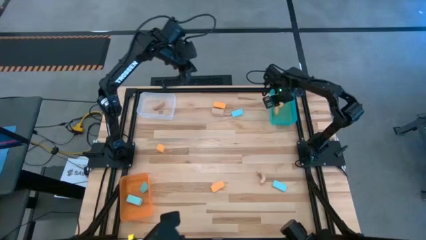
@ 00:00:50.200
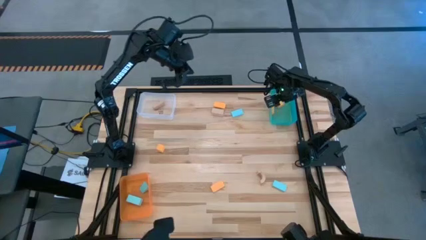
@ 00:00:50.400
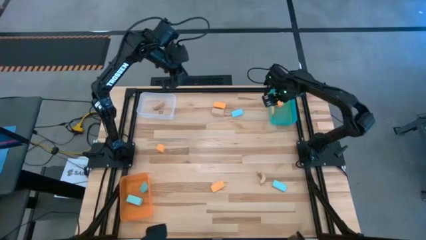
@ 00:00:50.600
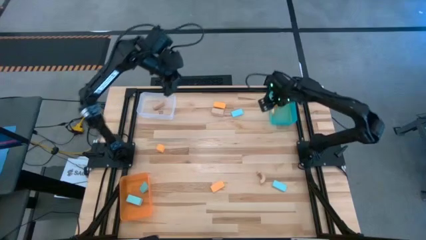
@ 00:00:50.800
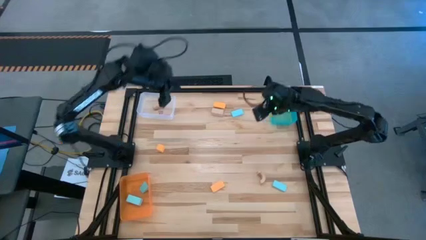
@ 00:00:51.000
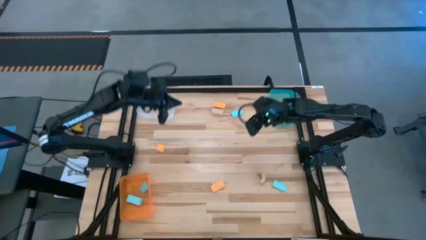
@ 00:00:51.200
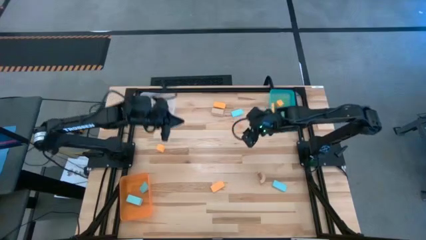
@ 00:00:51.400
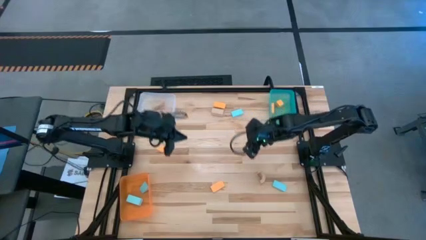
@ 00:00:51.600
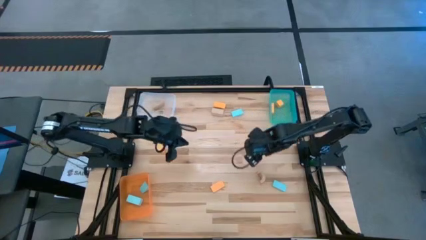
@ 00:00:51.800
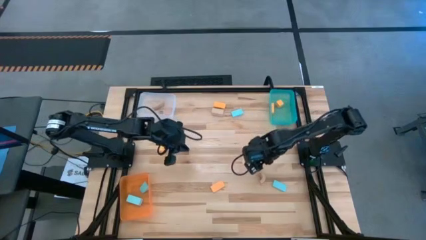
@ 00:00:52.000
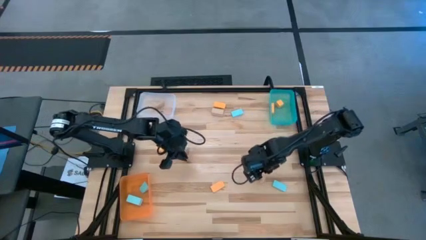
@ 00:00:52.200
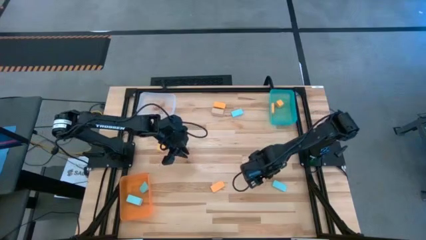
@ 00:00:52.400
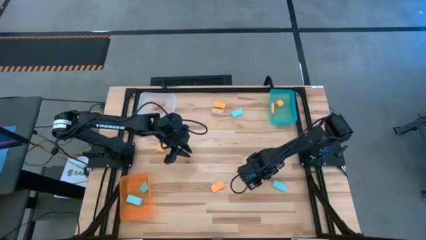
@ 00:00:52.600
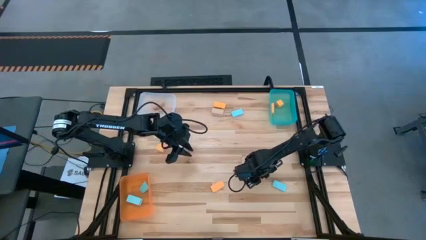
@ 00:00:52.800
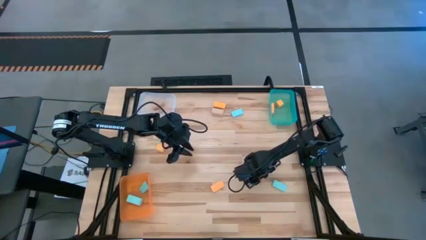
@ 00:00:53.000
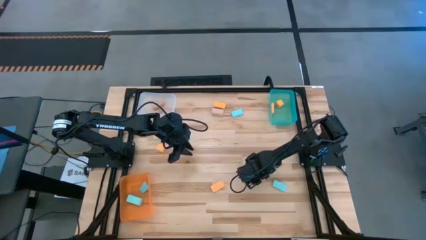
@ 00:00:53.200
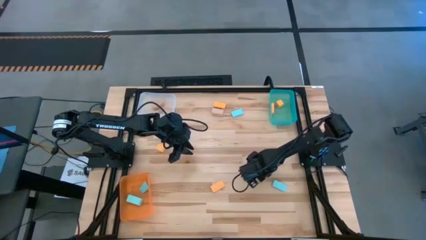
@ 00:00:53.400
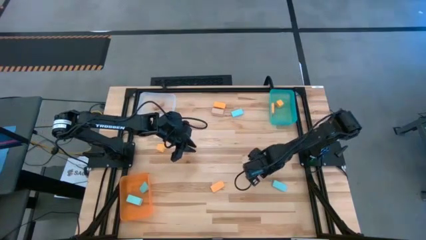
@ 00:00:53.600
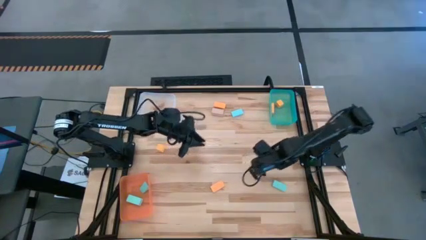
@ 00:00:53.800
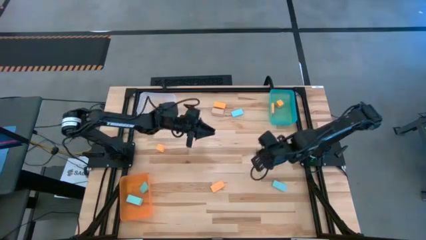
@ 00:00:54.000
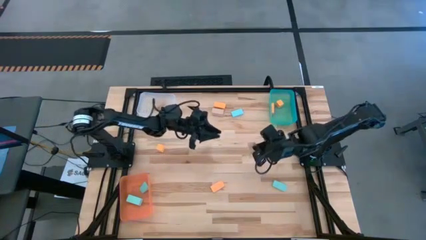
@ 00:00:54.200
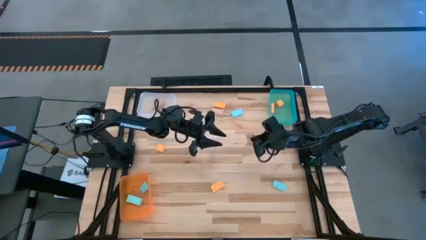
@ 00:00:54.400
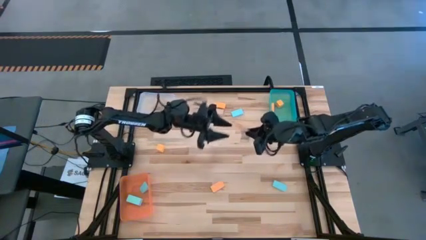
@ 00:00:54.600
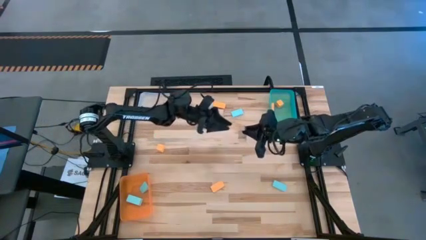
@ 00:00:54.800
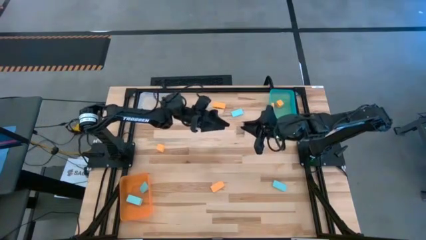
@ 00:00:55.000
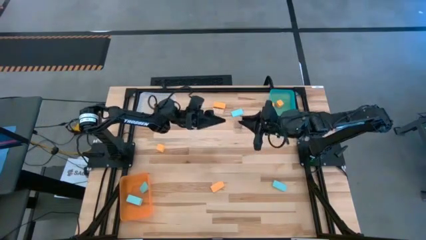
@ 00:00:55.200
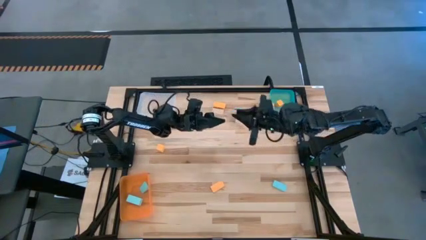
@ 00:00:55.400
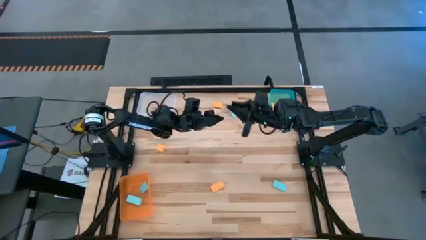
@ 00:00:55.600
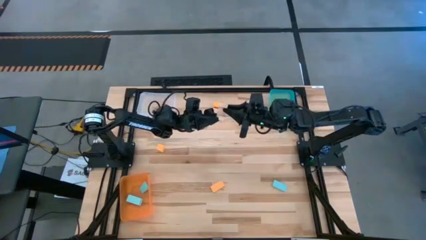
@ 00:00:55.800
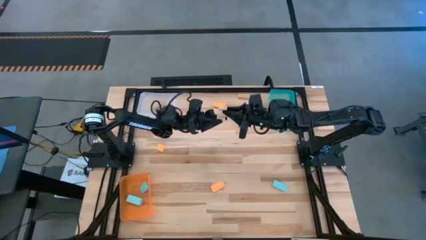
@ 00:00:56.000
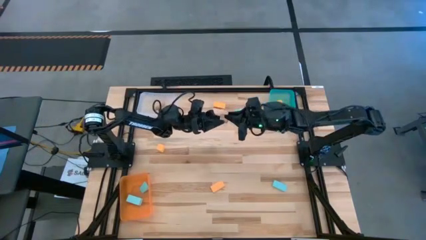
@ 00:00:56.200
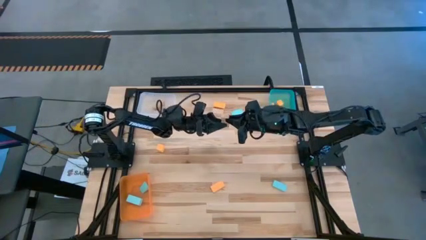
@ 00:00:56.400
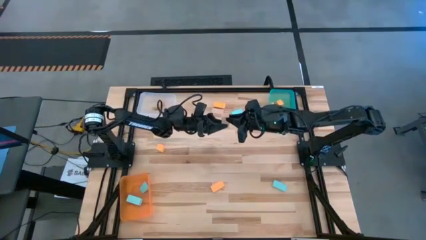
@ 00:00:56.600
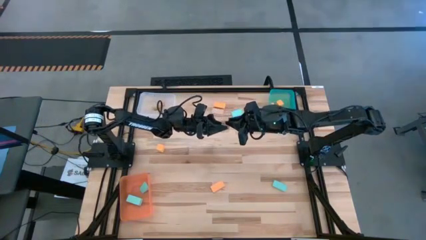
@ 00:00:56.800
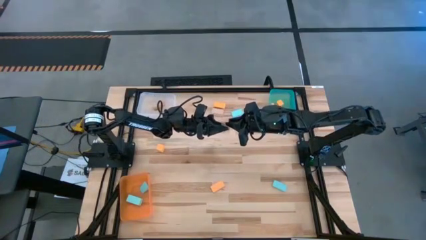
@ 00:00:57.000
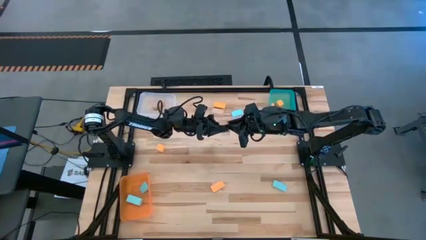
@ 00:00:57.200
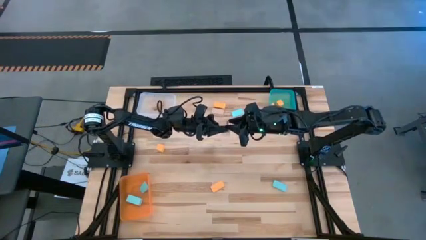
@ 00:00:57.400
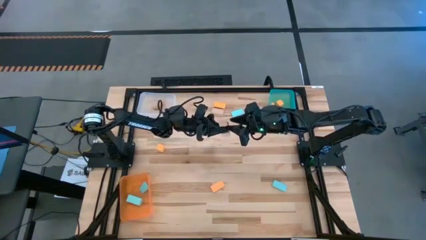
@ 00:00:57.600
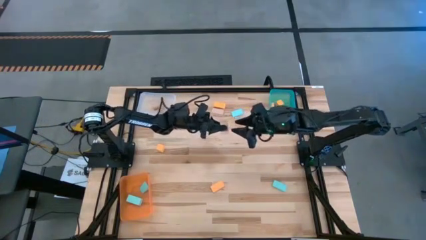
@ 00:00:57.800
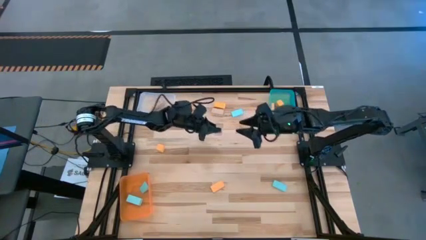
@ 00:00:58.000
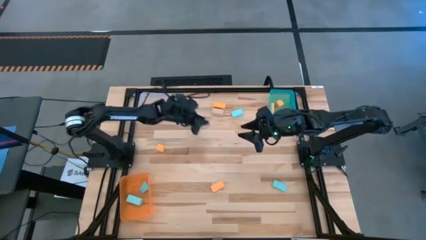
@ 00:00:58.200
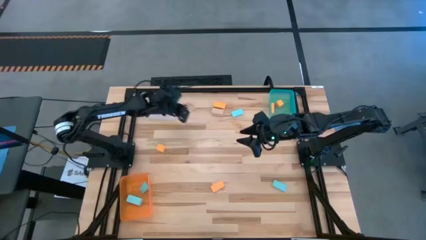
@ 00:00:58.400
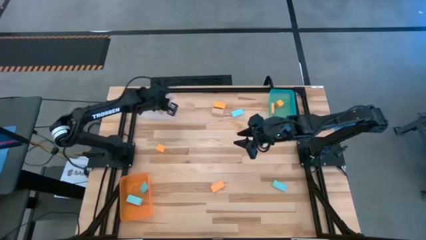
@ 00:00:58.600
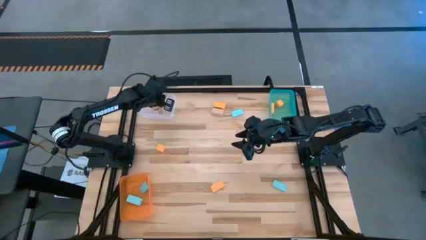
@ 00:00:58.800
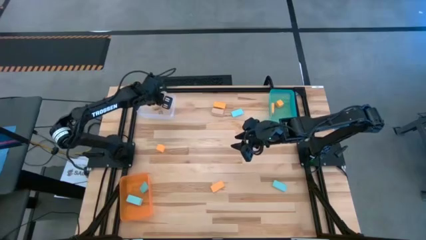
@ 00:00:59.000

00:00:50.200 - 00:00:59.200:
Task: Sort & place blocks by color
Put the brown block into the transparent bin

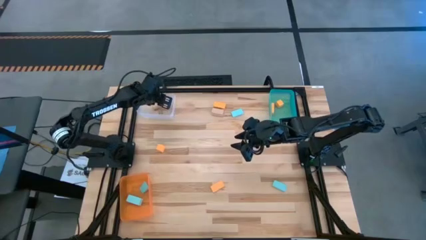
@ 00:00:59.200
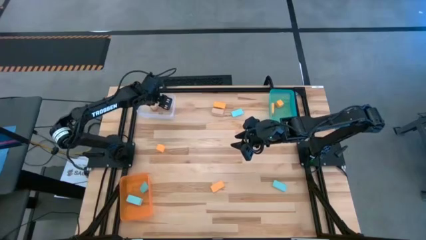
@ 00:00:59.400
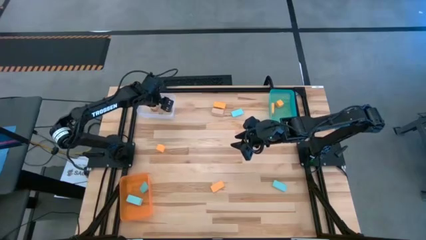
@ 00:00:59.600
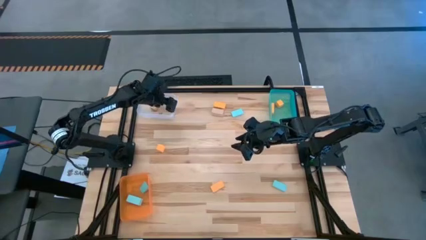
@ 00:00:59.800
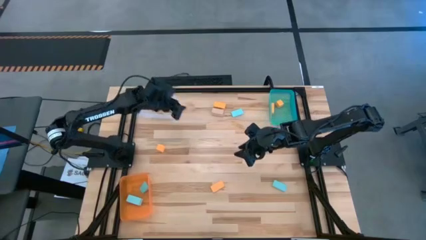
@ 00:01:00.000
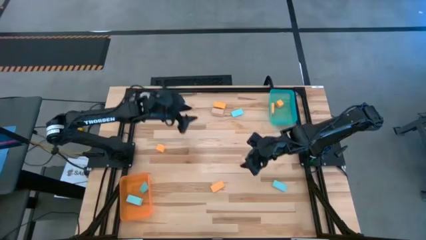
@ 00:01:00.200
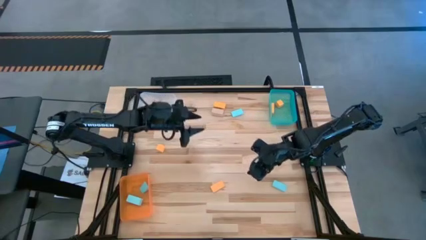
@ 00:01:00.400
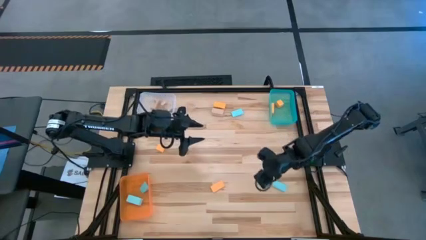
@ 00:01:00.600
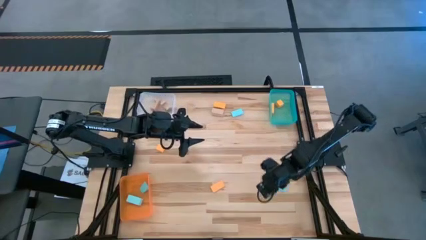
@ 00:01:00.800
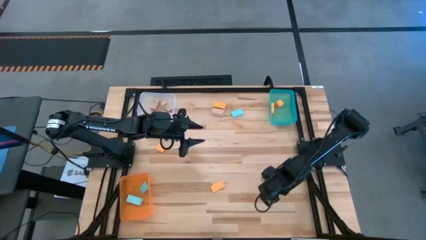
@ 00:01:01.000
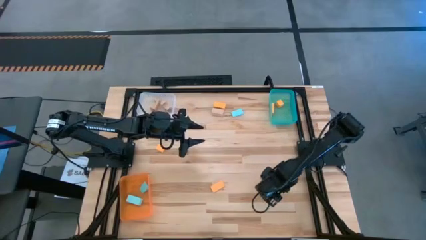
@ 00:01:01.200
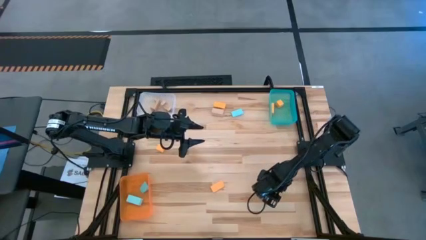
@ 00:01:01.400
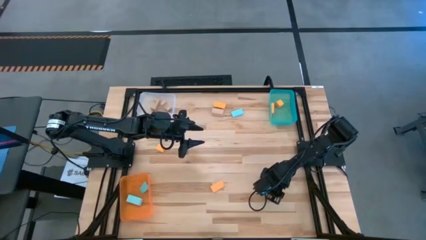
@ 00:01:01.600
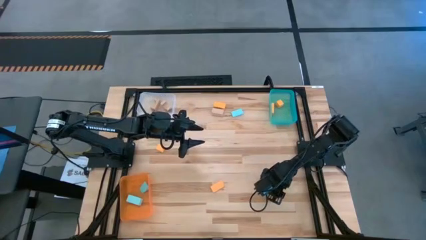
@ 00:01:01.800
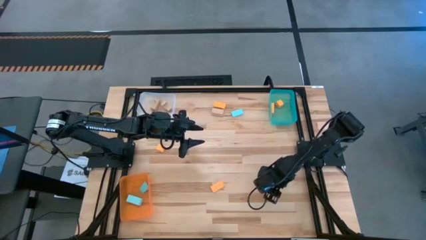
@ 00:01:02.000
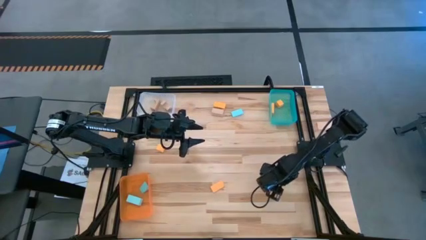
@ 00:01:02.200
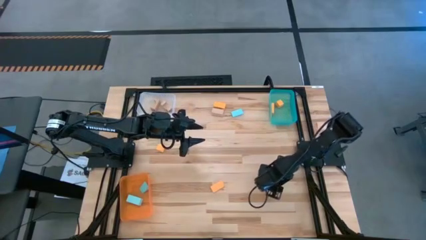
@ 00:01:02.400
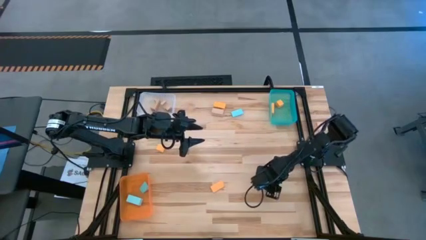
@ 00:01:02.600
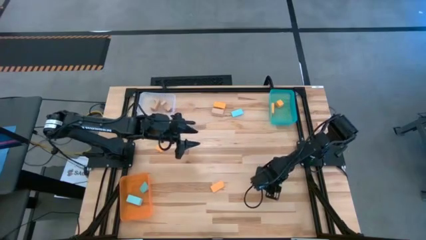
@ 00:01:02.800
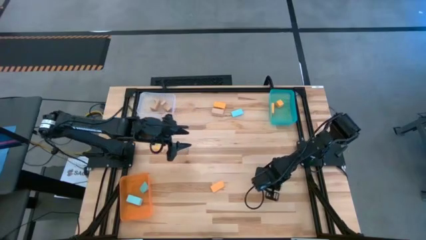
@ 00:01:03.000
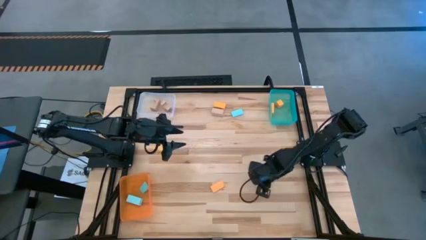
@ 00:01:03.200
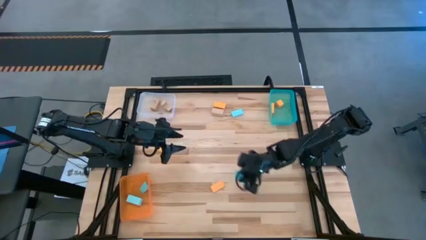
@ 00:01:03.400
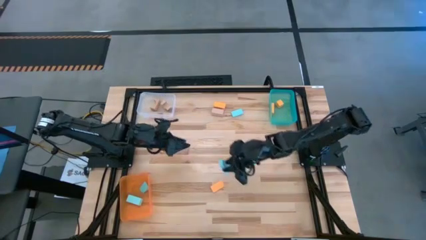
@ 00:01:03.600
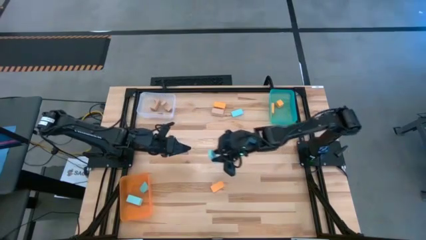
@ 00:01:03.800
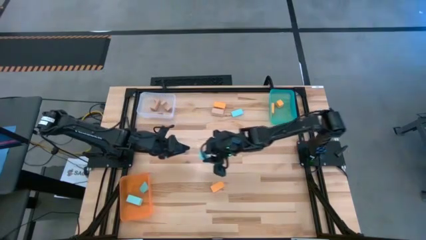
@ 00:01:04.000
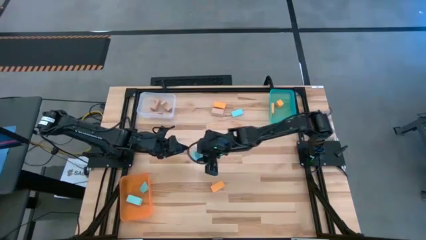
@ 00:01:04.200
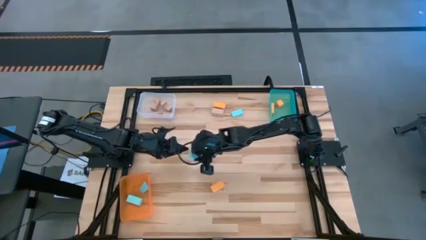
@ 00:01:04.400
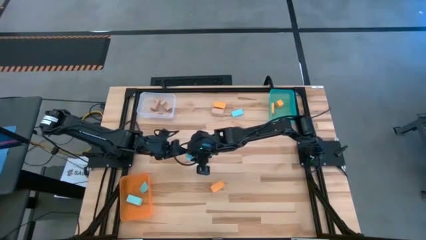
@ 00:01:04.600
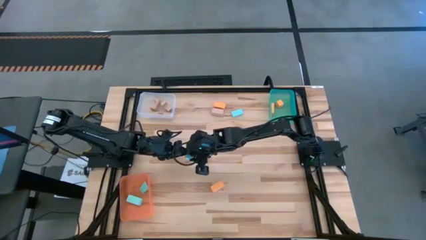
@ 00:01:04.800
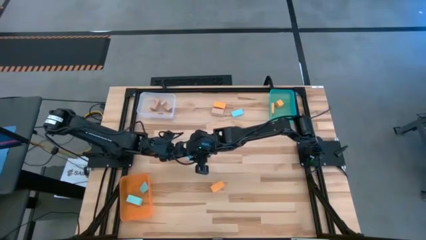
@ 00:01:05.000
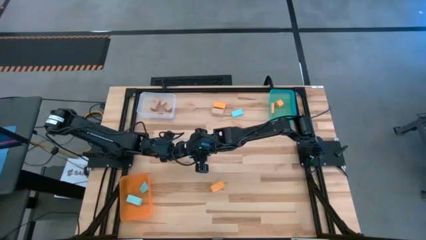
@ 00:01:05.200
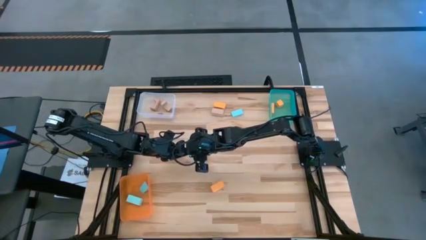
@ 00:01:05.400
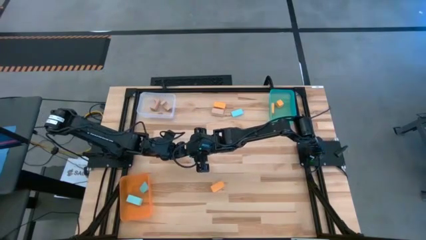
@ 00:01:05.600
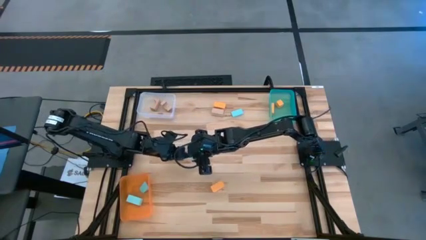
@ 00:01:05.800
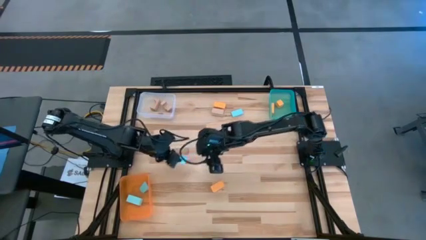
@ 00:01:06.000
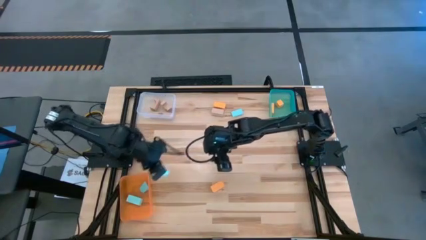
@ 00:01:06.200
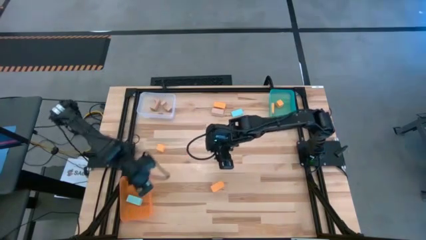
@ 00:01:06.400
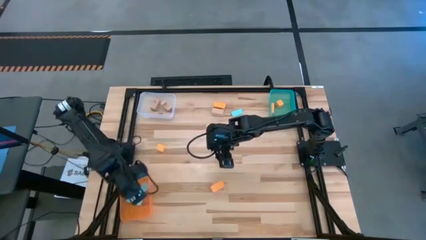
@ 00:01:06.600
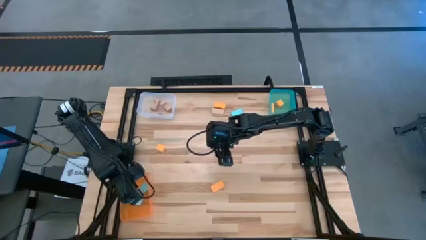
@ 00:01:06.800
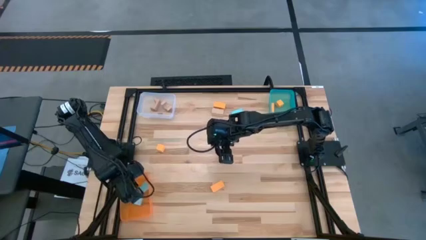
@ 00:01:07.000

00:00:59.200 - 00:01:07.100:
Put the light blue block into the orange bin
